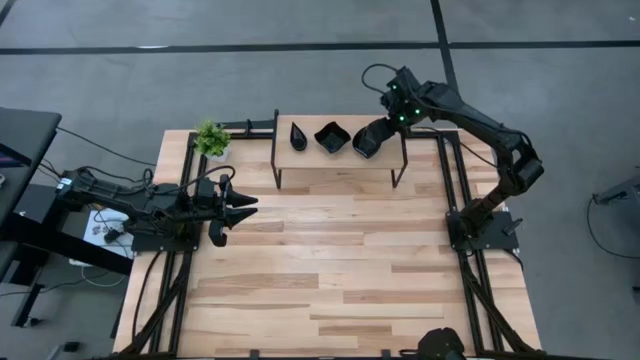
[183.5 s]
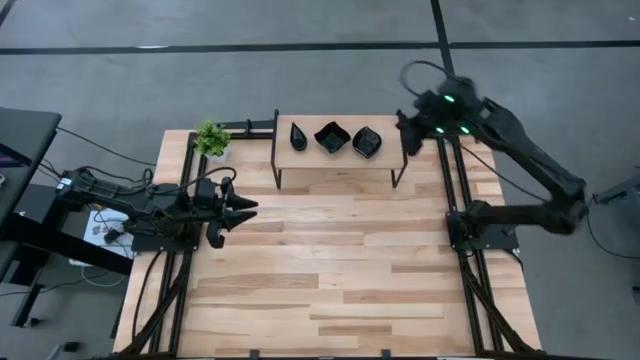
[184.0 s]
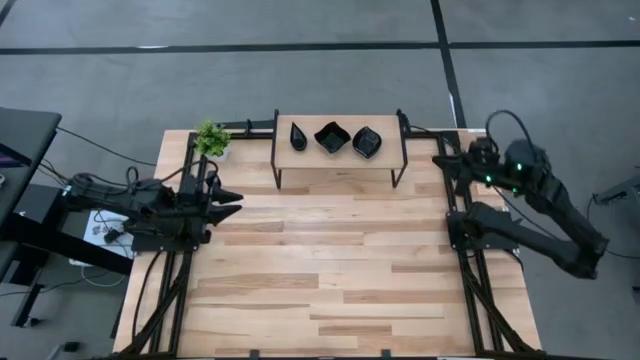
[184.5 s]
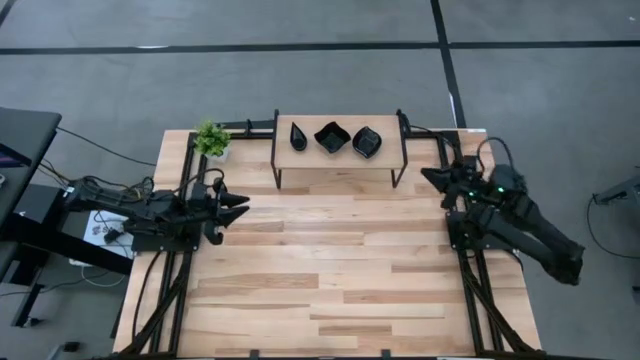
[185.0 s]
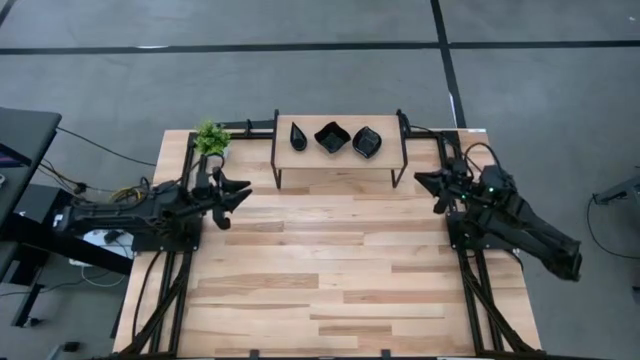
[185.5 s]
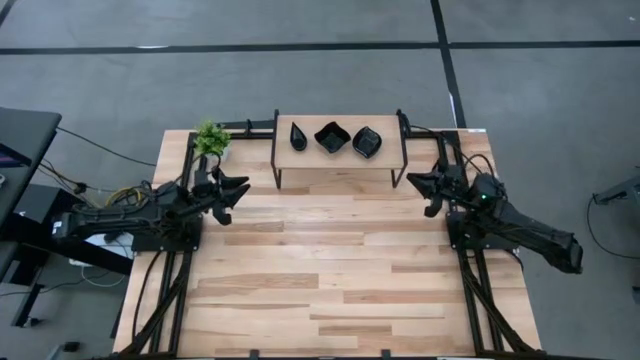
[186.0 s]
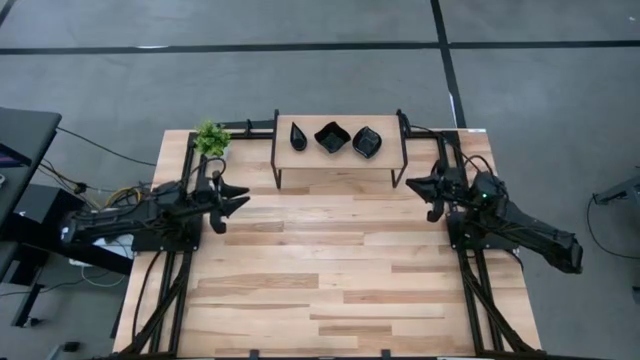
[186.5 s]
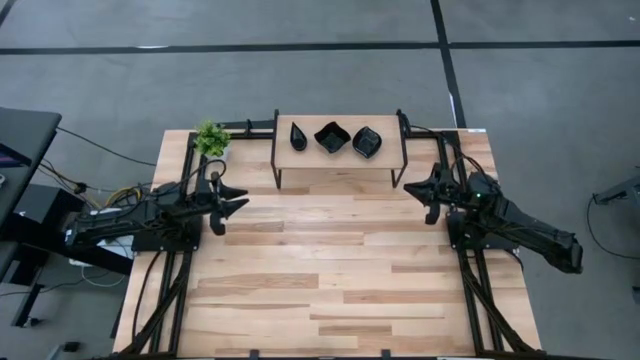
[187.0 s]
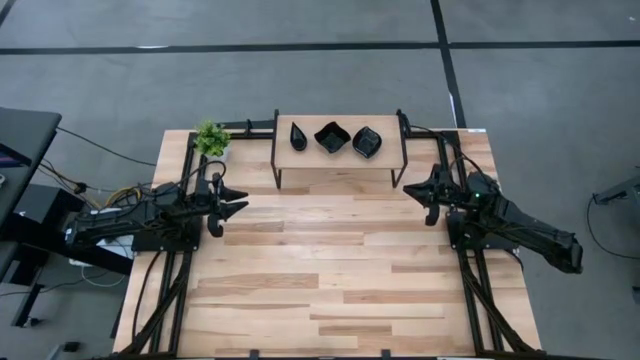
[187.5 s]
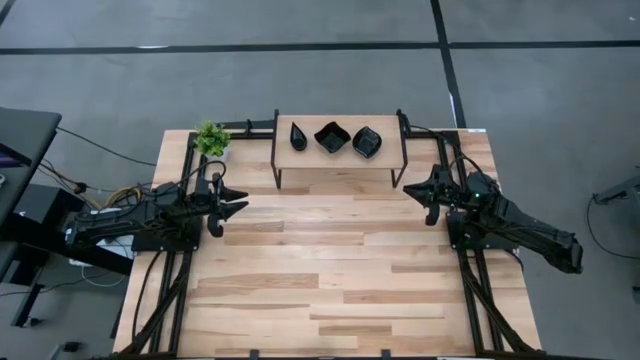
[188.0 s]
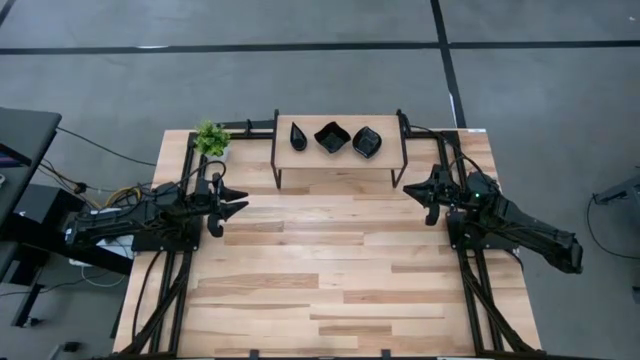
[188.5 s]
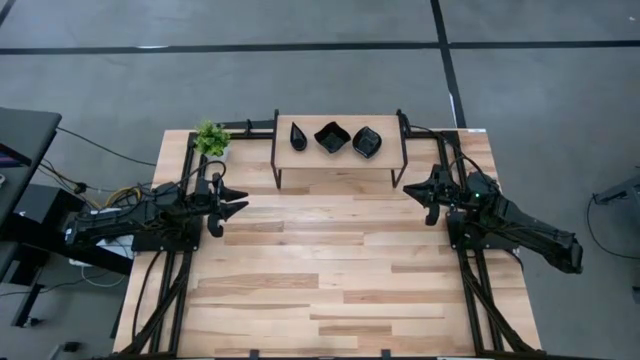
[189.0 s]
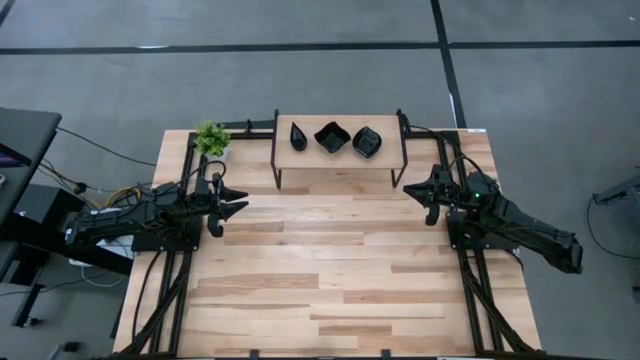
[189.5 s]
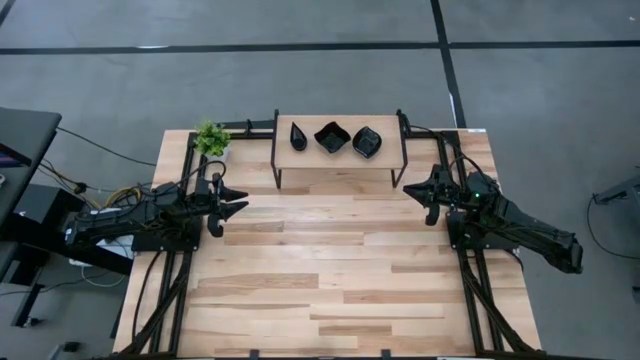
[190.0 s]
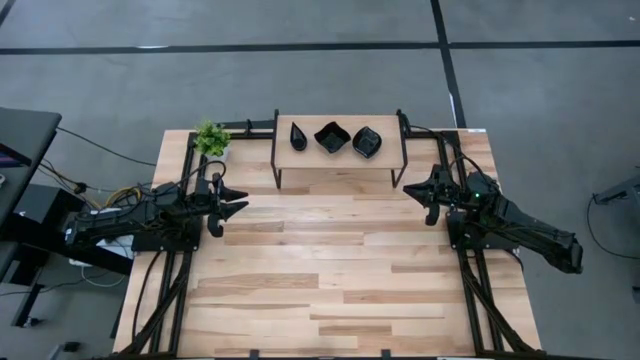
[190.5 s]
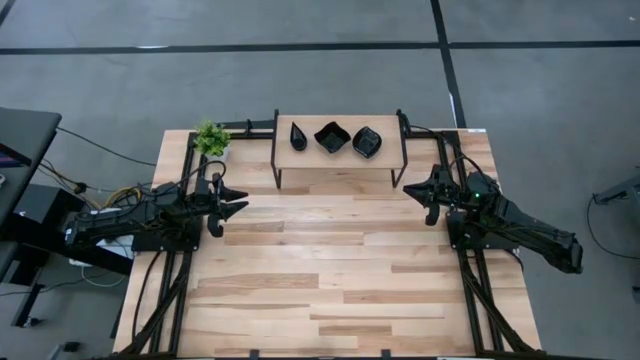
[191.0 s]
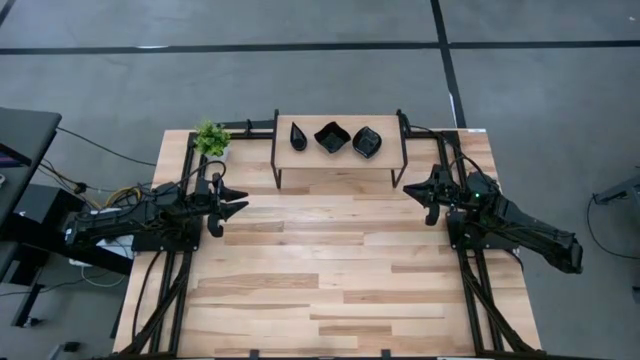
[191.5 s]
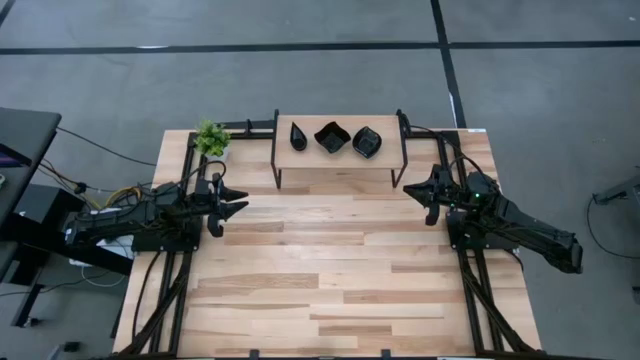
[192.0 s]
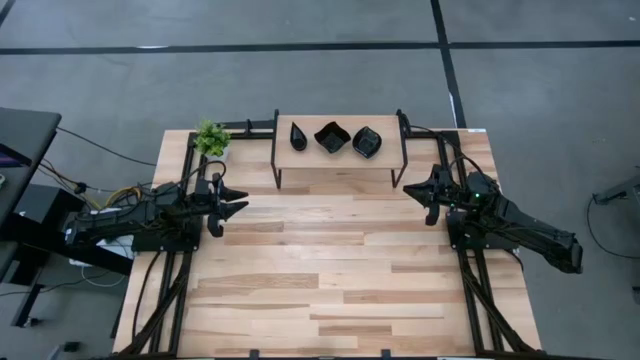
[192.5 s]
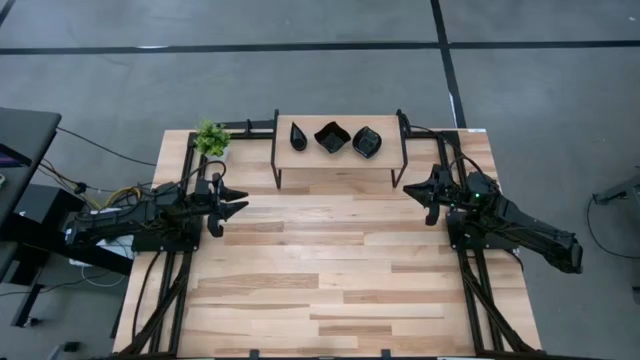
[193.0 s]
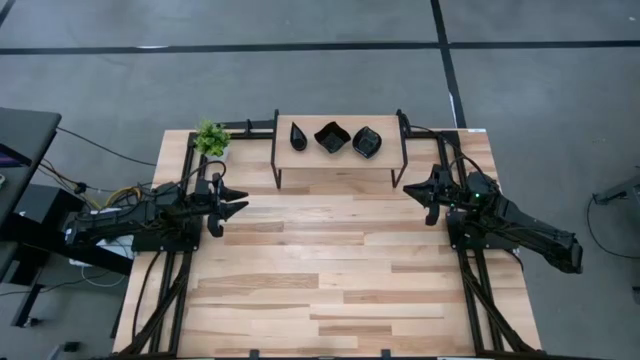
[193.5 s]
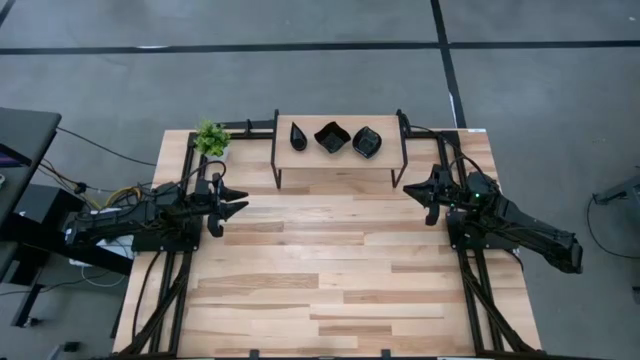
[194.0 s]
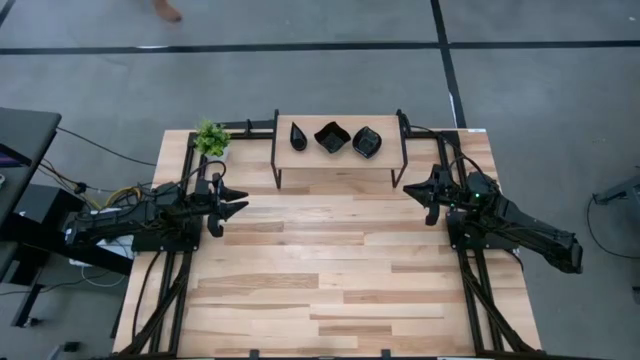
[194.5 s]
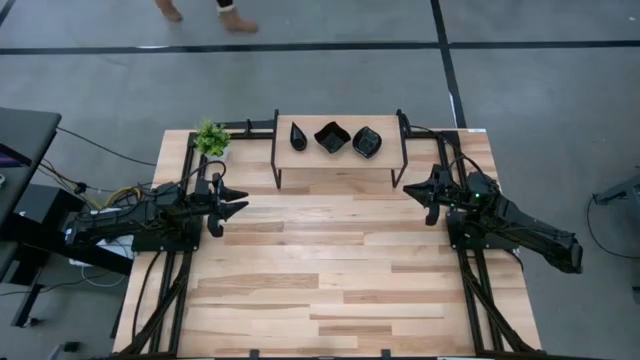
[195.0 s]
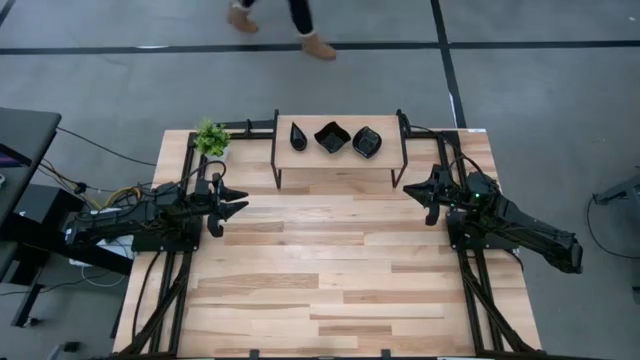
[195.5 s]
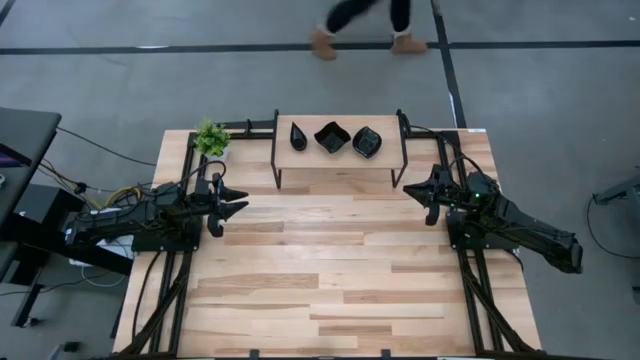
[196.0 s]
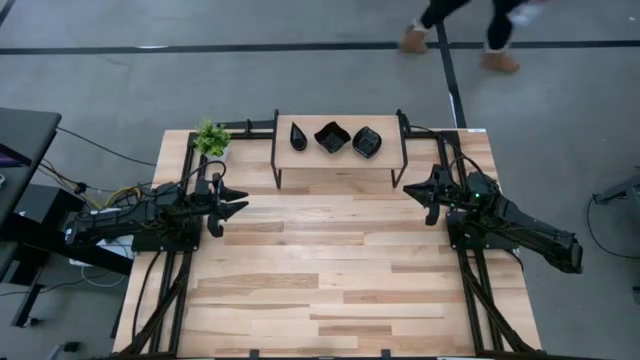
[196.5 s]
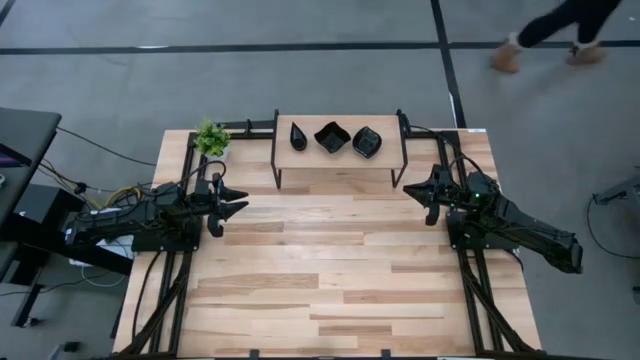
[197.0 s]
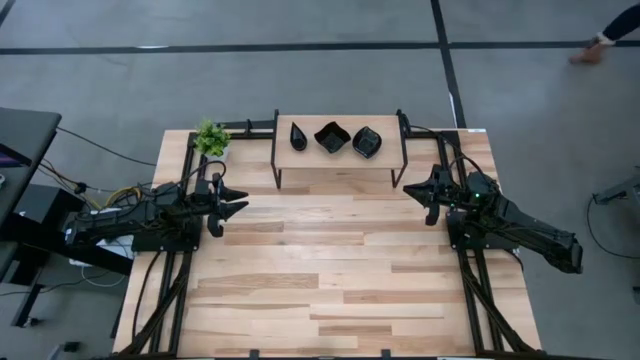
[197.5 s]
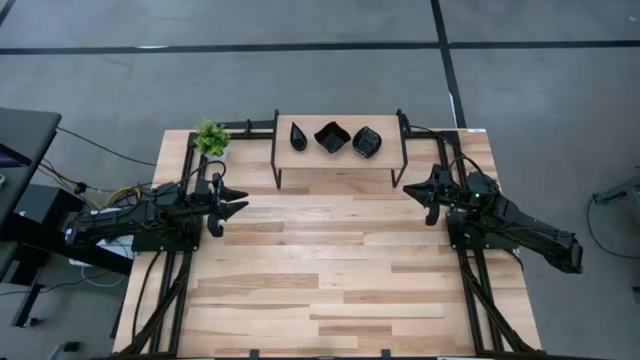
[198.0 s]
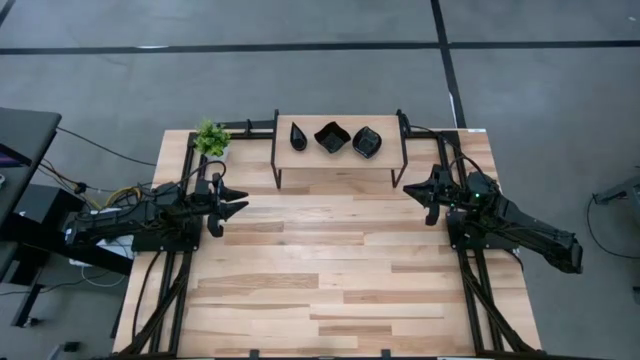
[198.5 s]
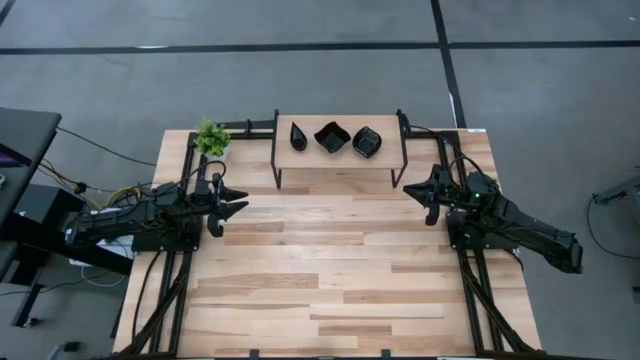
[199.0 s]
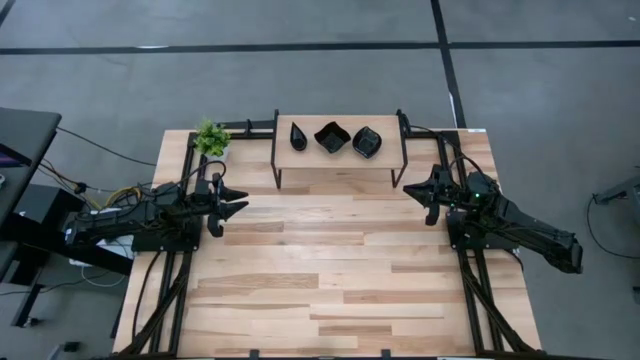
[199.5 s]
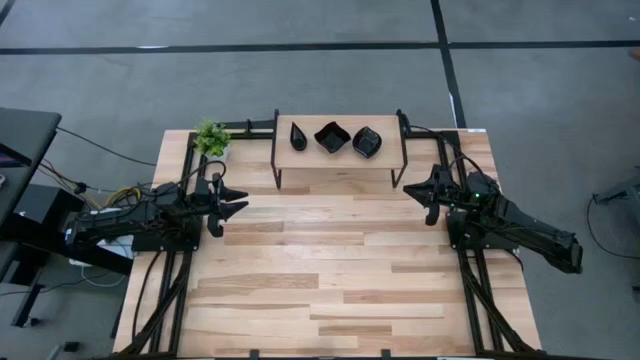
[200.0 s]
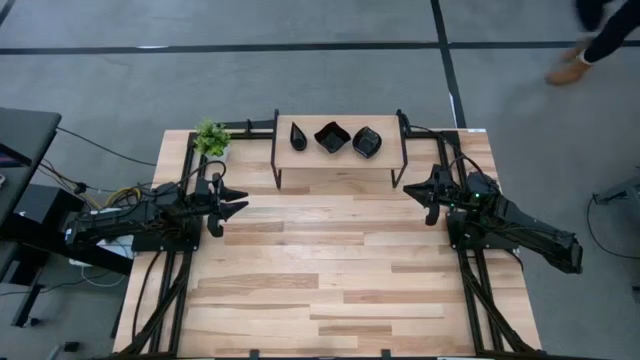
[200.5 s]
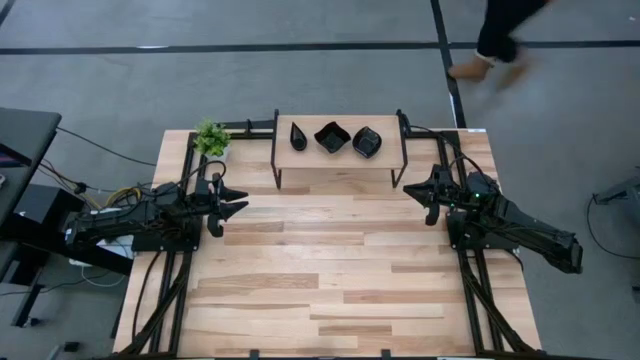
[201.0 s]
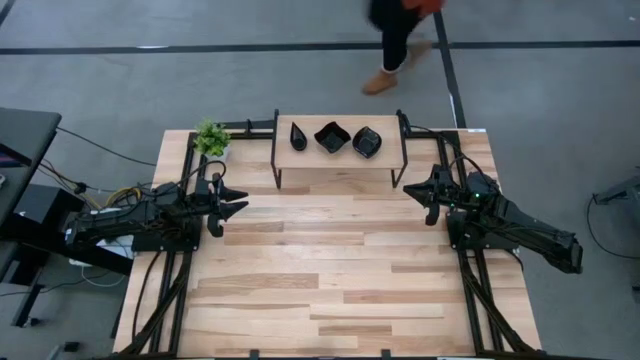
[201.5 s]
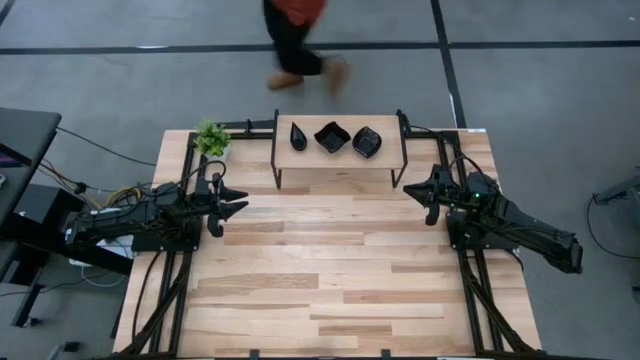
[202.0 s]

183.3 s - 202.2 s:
Task: Pick & Place Mini shaped plates
Return to Home Position

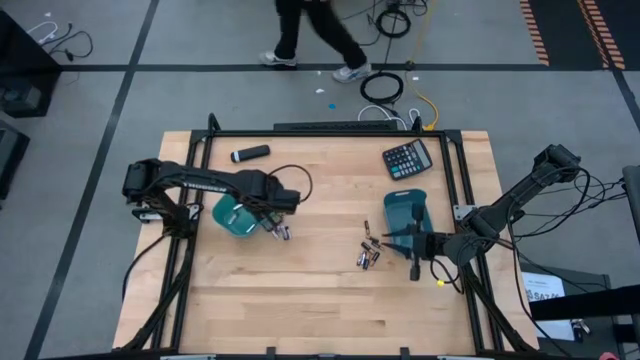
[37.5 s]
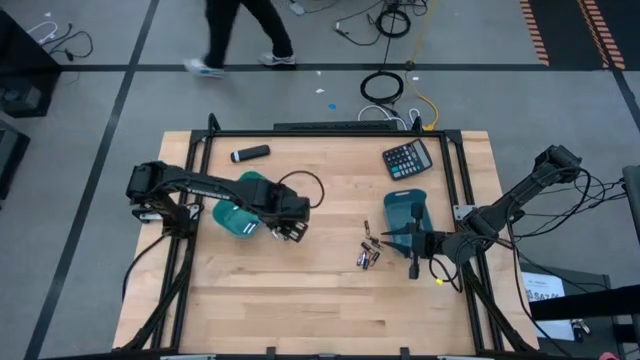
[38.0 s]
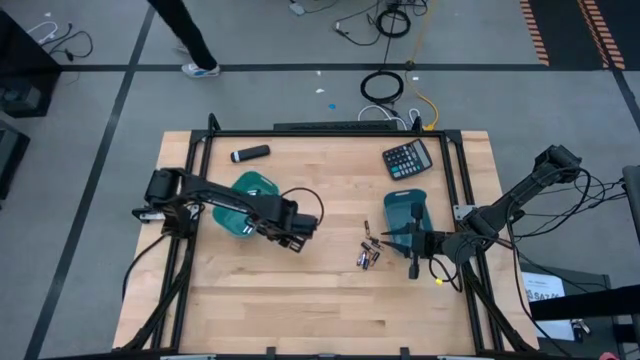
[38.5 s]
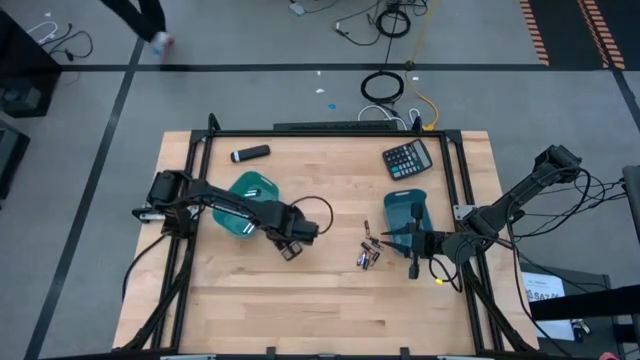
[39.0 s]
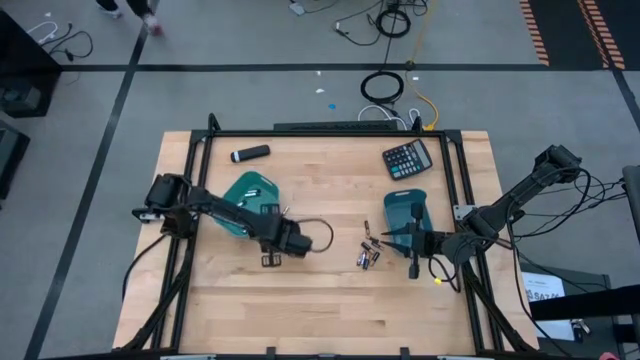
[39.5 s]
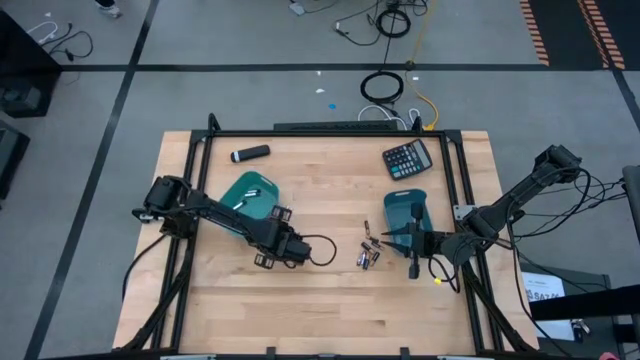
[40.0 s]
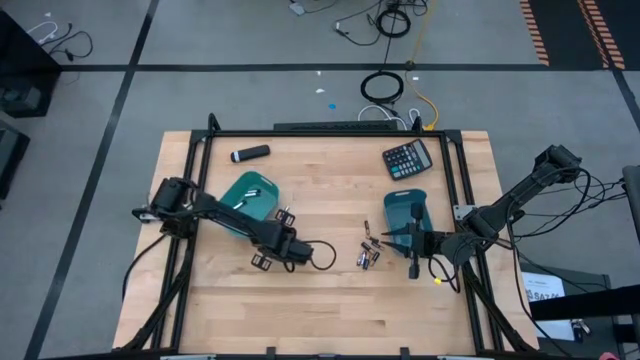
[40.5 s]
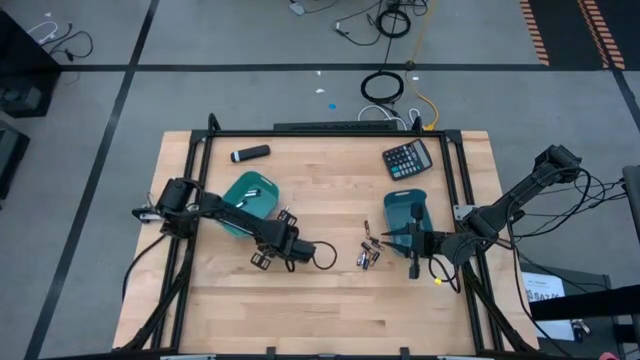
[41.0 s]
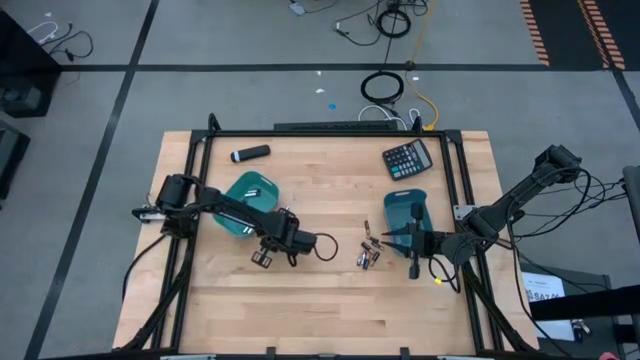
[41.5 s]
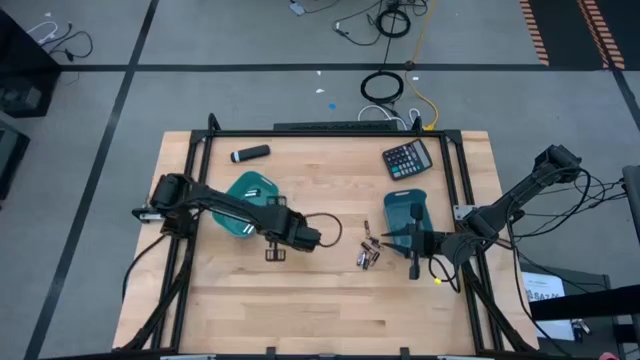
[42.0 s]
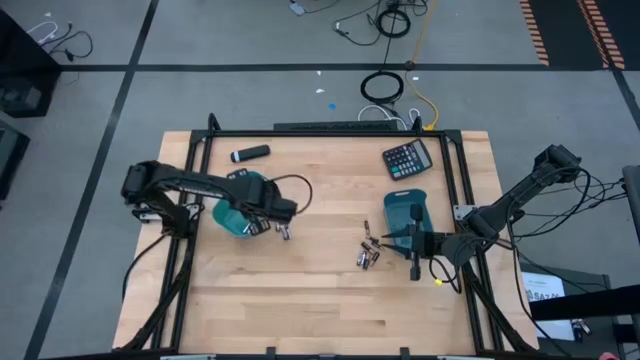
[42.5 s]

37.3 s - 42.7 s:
Task: Sort batteries
Put the silver battery into the green bin
